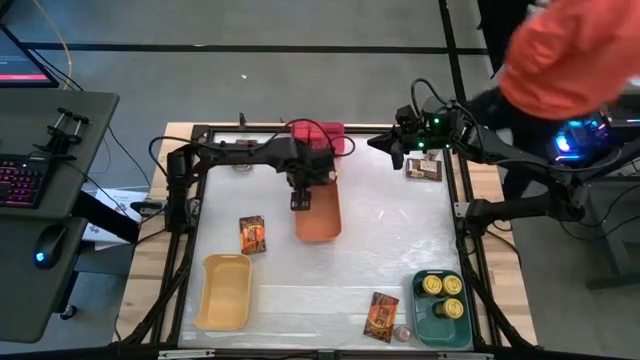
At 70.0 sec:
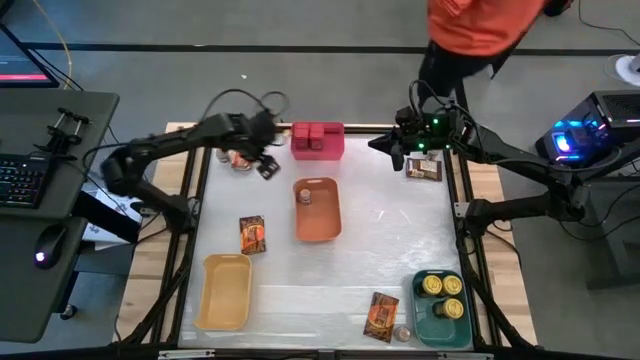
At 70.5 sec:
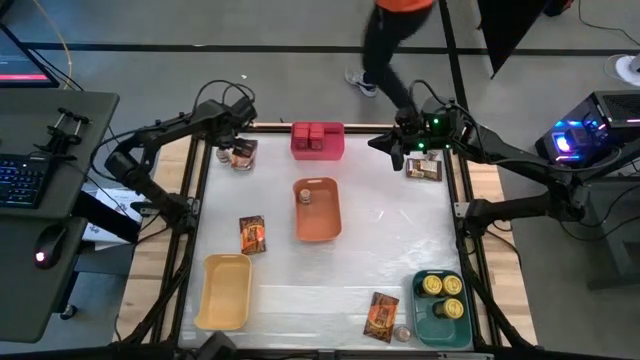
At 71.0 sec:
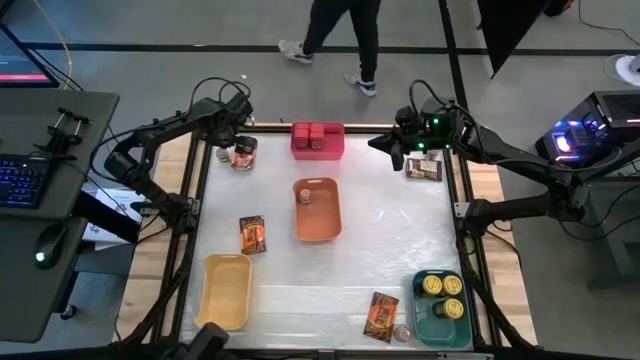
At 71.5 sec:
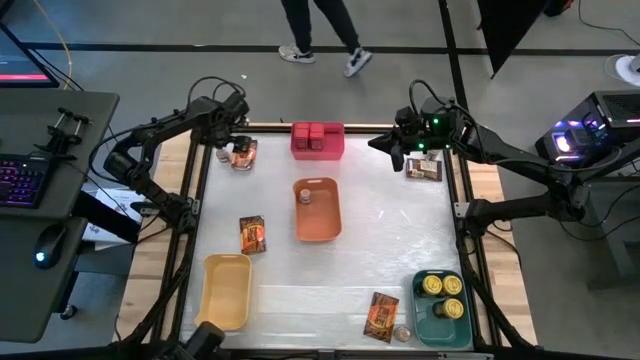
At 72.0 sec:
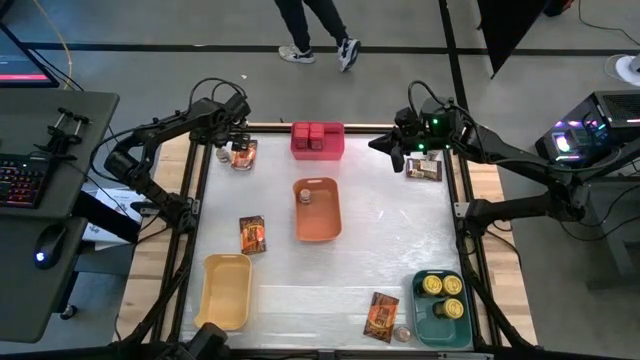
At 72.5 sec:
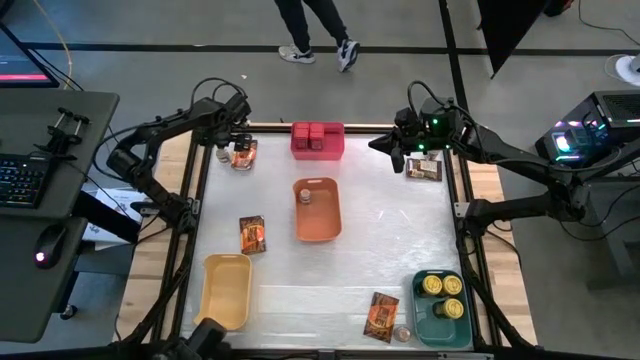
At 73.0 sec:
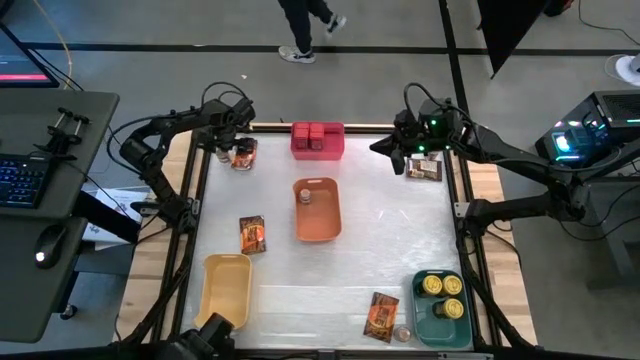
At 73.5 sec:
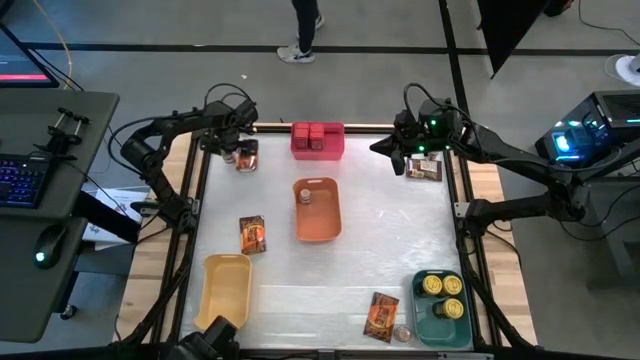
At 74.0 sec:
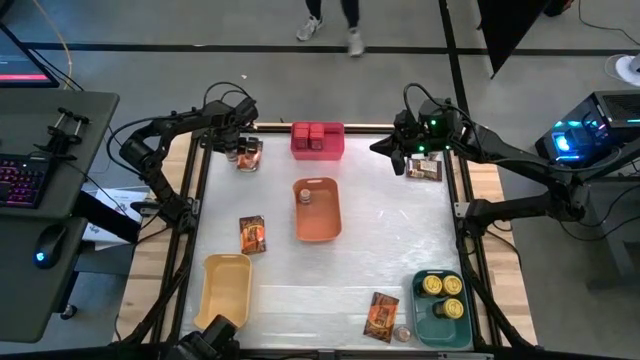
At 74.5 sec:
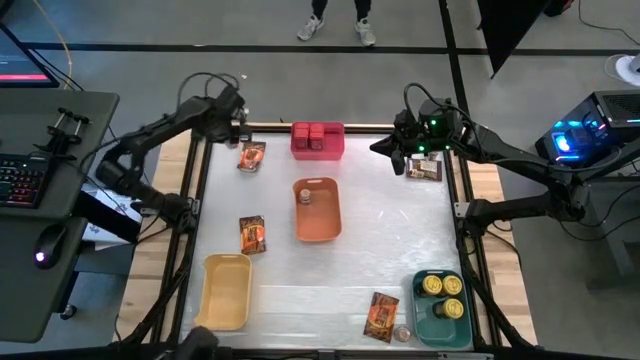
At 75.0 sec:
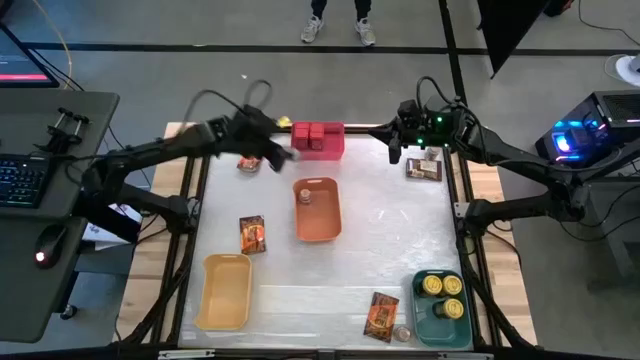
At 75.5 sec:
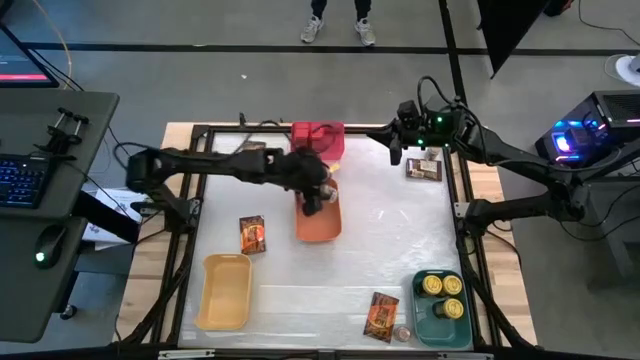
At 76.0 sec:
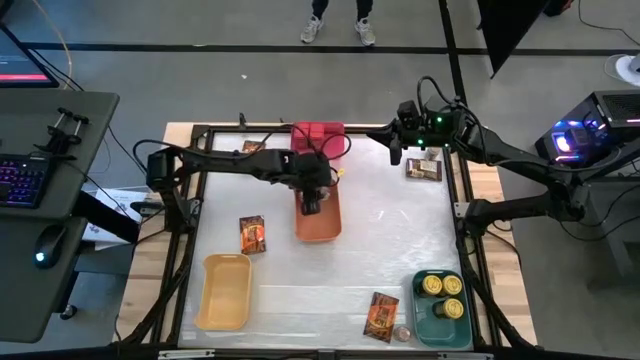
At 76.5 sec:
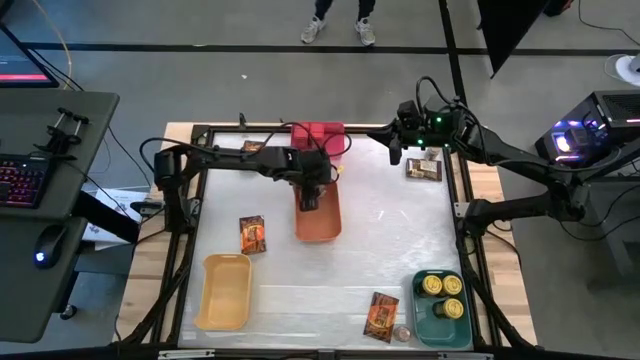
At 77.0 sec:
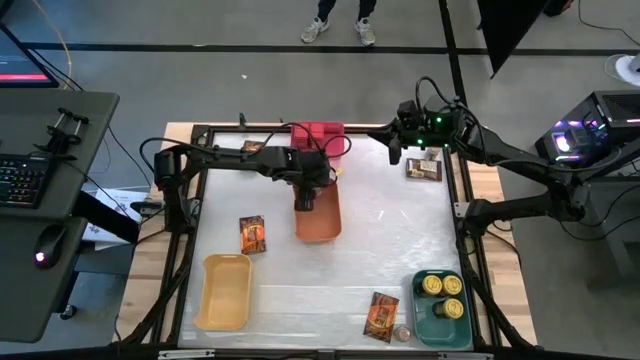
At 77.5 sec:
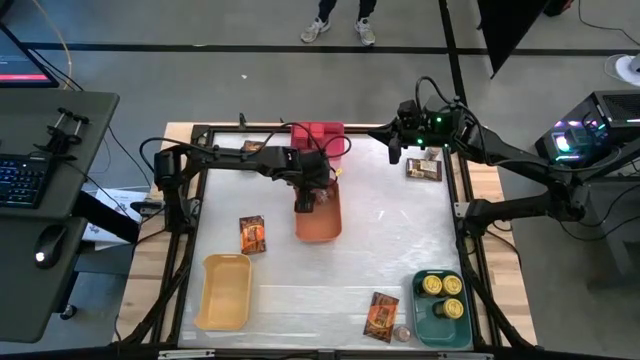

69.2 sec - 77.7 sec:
Task: Sort spices by type
Put the top left brown spice bottle into the orange can

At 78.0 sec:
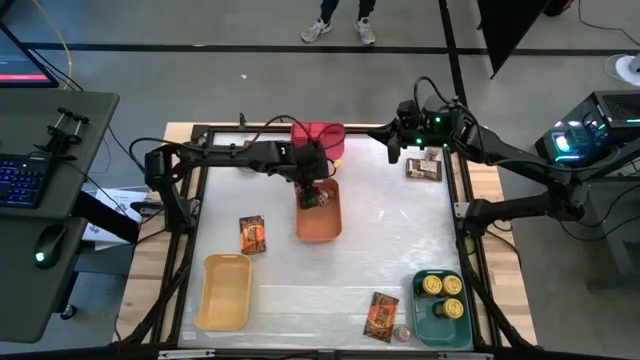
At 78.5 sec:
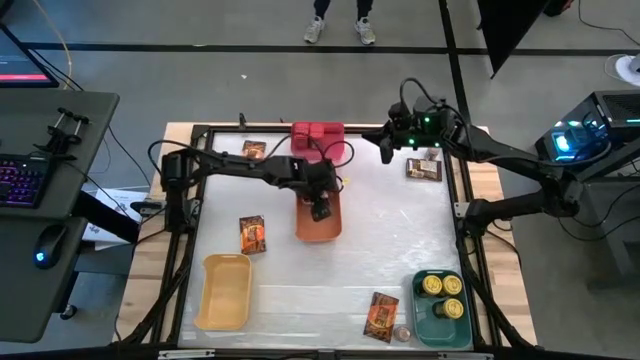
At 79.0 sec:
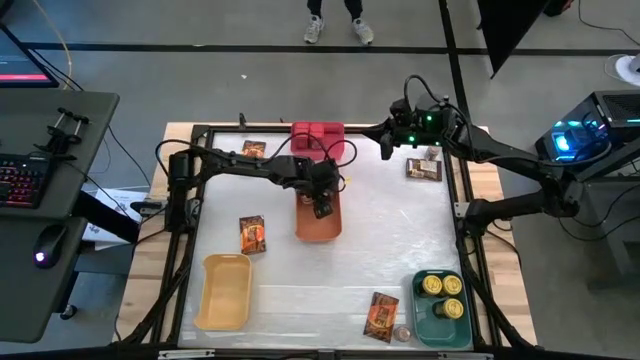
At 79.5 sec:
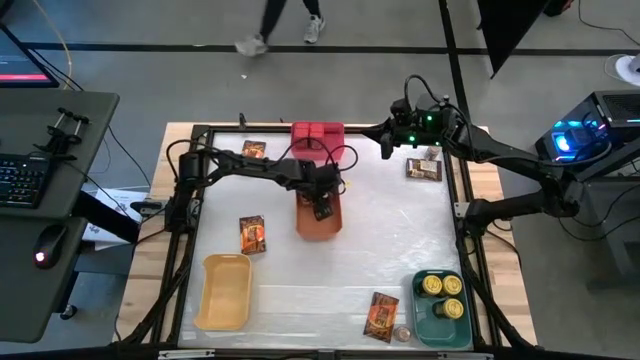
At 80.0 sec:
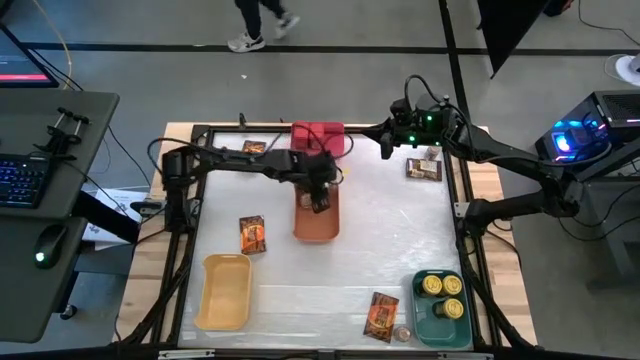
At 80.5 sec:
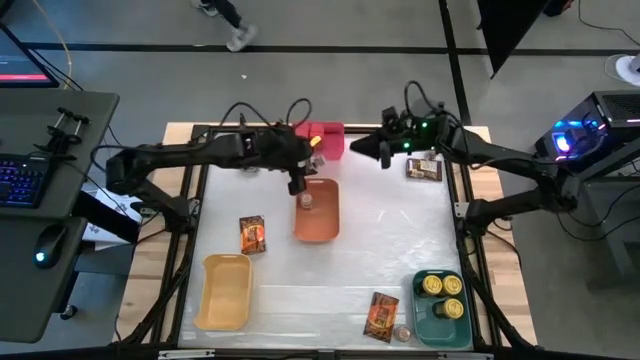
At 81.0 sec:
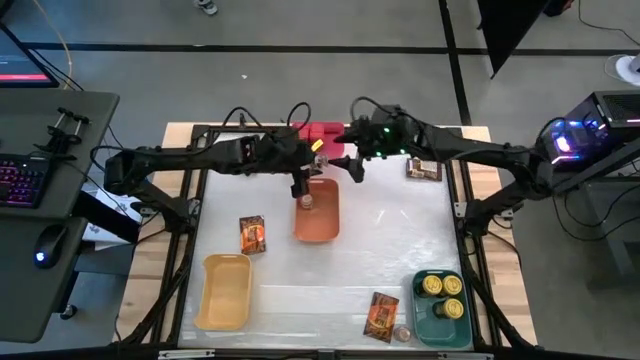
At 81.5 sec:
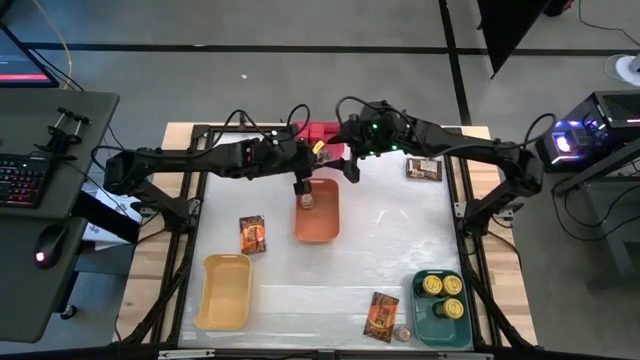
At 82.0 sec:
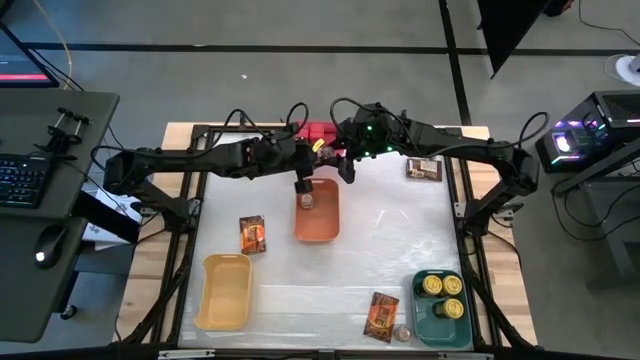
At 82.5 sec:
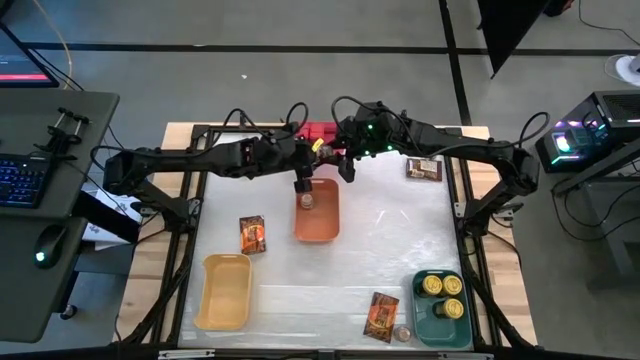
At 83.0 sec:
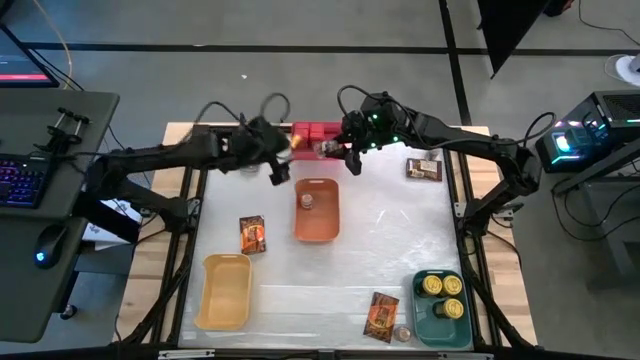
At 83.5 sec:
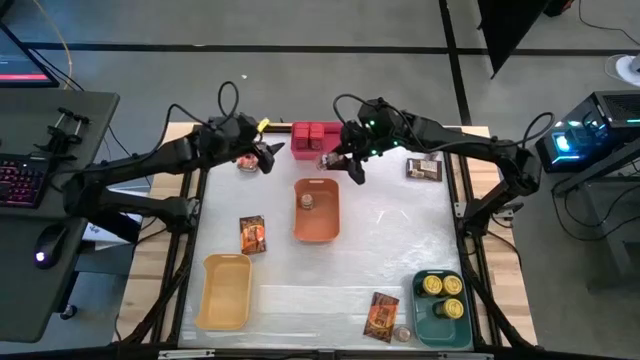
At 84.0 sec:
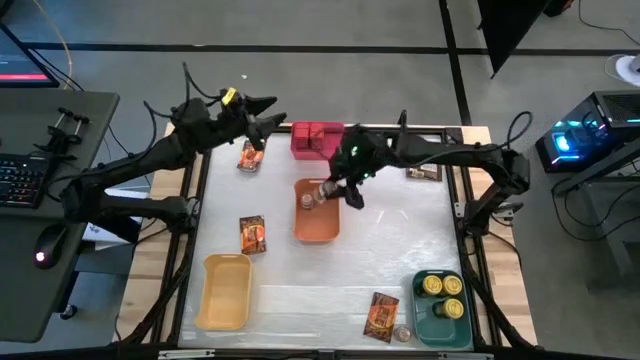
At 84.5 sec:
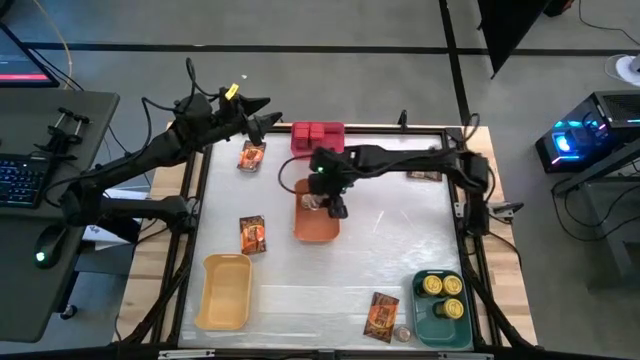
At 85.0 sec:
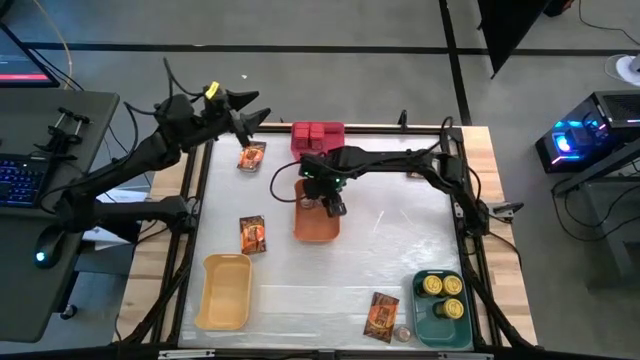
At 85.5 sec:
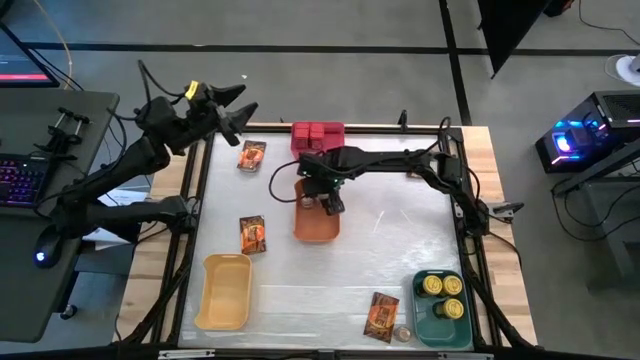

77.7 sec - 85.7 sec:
Put the top left brown spice bottle into the orange can

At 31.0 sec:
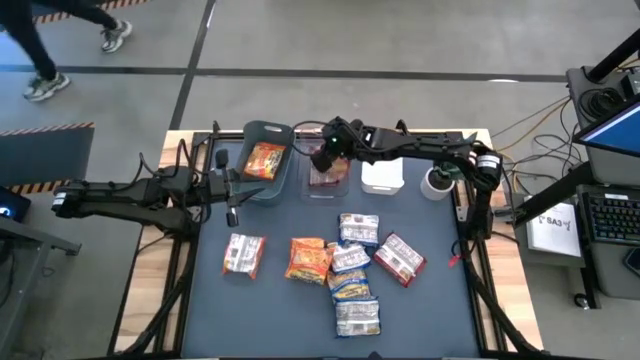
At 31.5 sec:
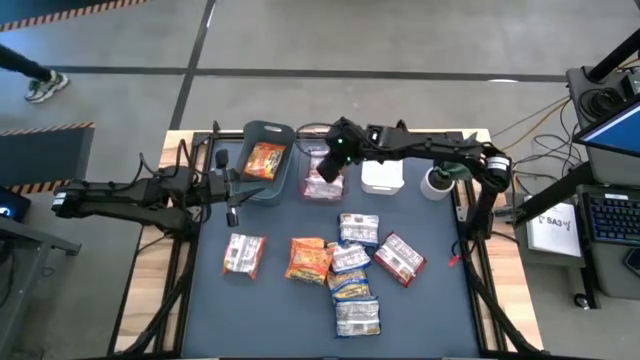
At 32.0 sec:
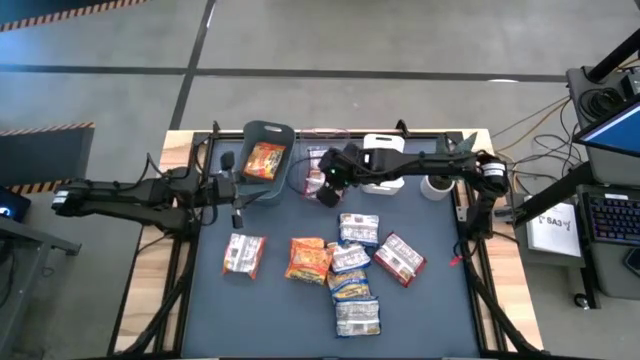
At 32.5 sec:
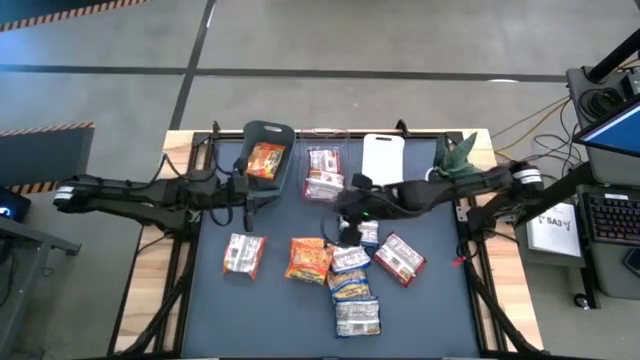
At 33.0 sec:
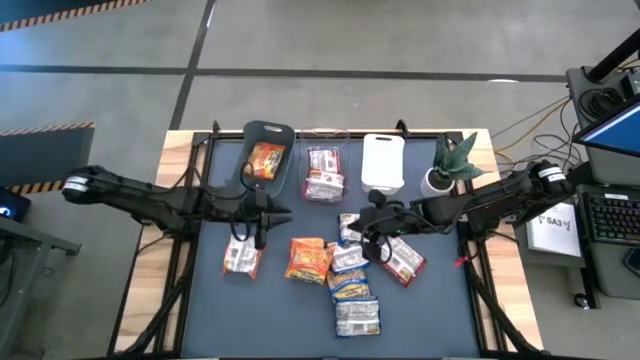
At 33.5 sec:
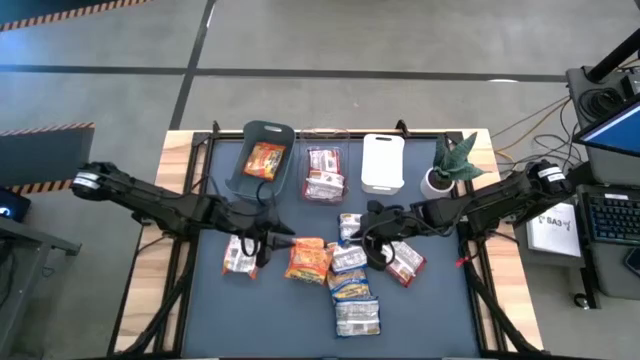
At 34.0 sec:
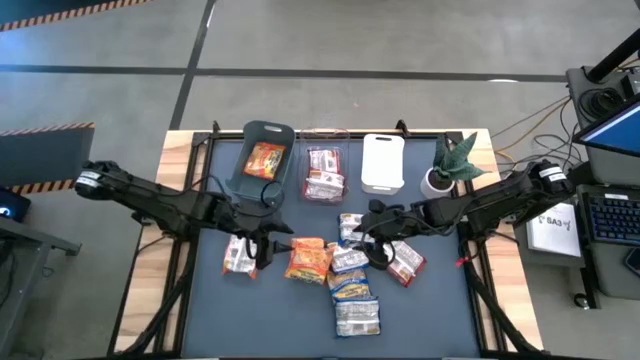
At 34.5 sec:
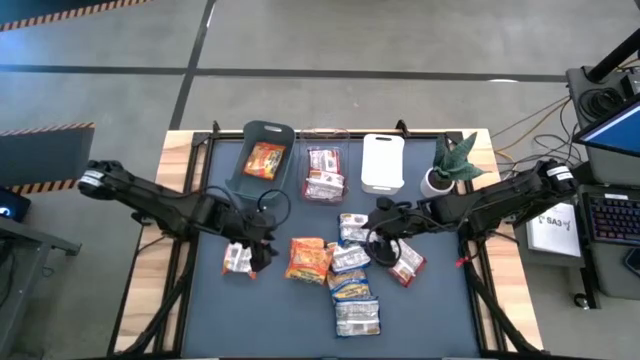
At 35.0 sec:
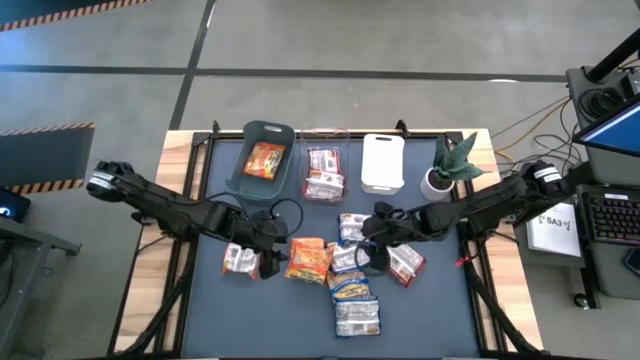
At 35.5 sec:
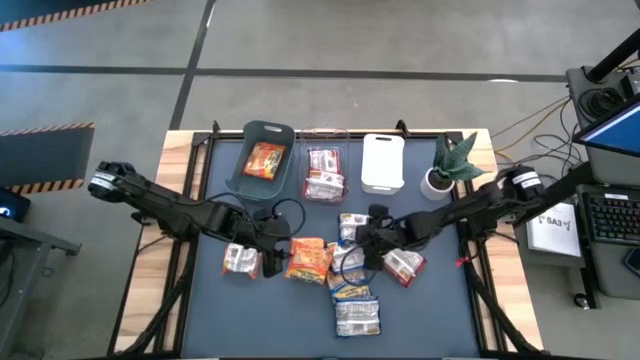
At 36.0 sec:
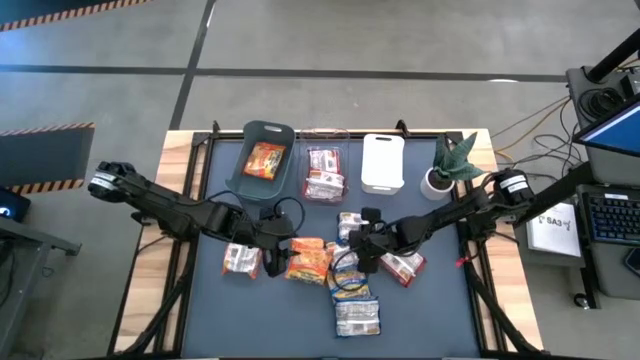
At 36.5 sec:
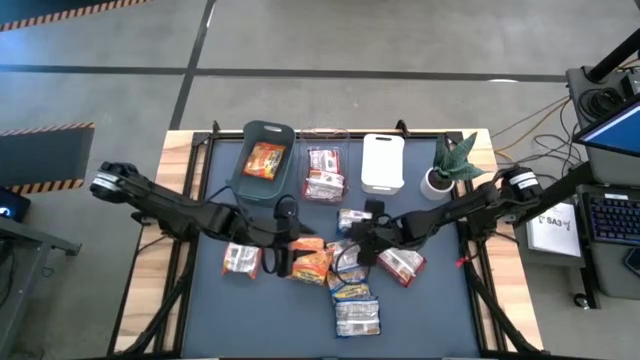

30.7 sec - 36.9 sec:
Task: Sort Maruchan noodles
Put the blue noodle pack into the white bin
